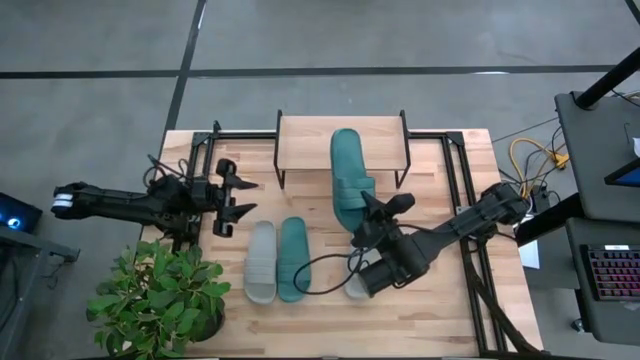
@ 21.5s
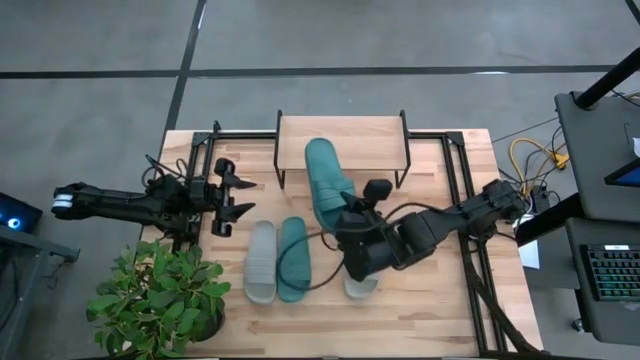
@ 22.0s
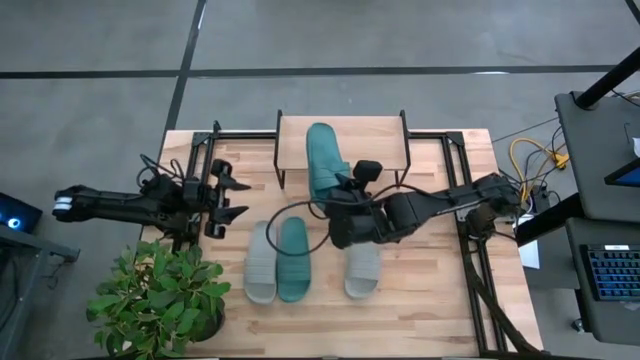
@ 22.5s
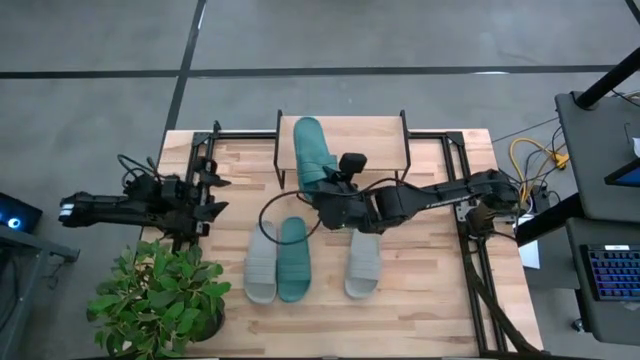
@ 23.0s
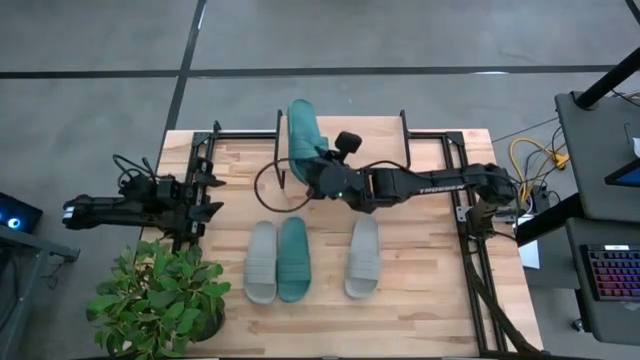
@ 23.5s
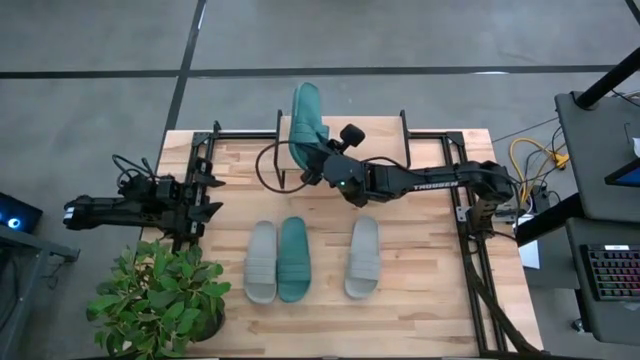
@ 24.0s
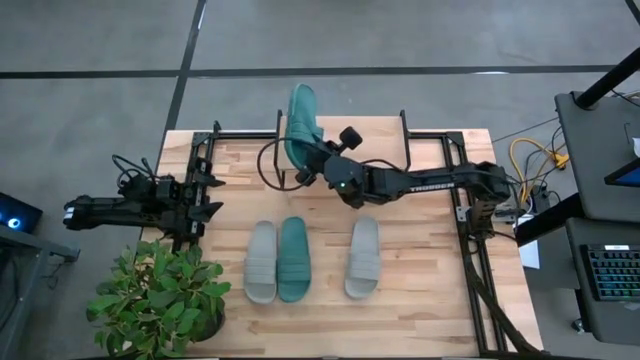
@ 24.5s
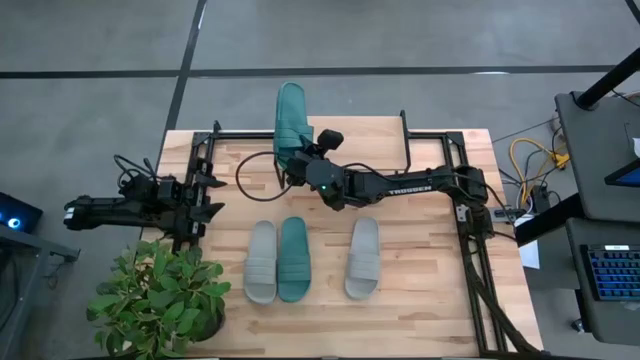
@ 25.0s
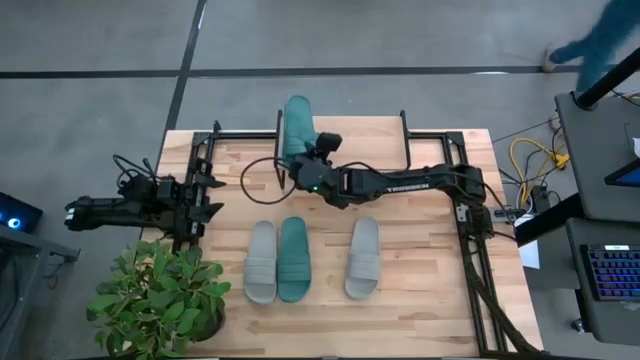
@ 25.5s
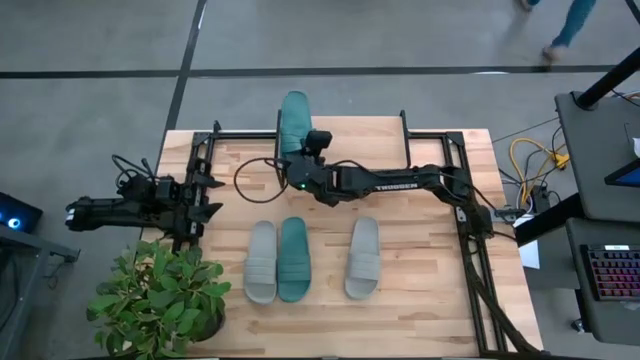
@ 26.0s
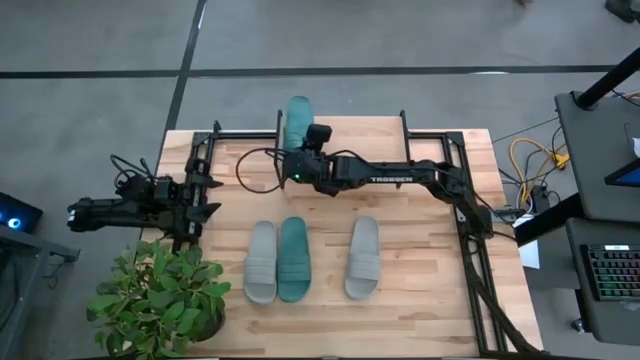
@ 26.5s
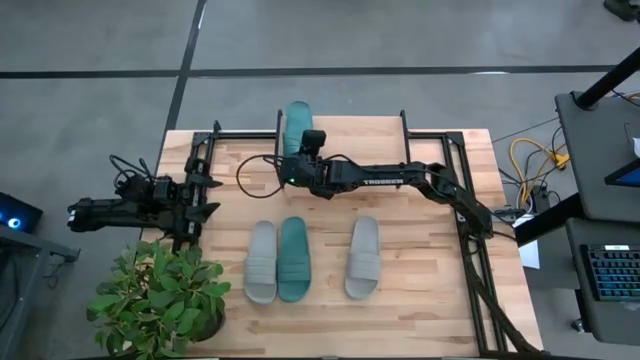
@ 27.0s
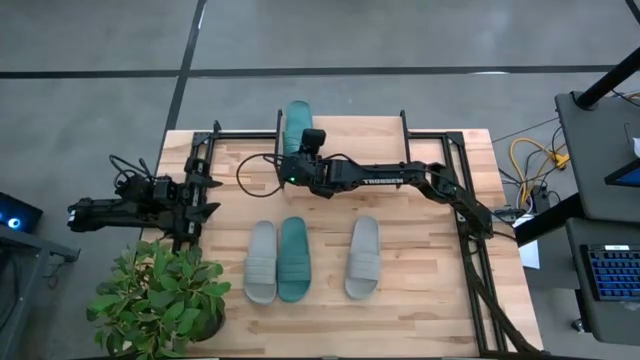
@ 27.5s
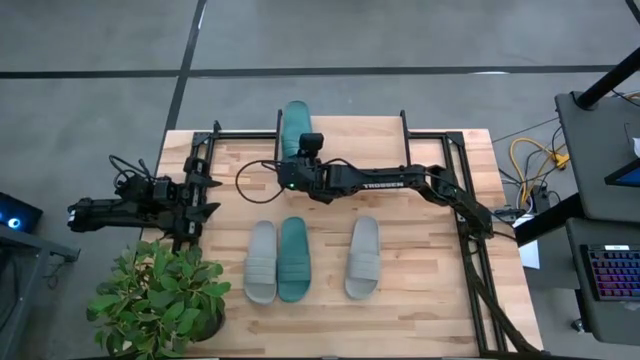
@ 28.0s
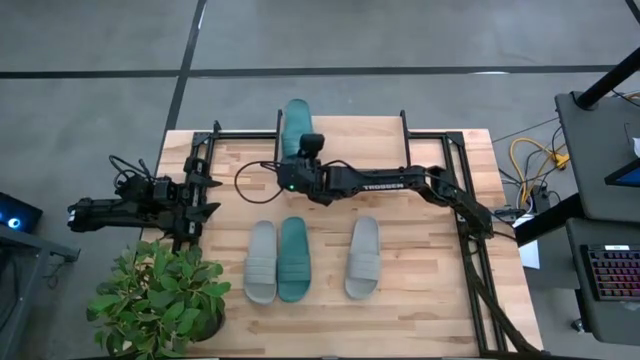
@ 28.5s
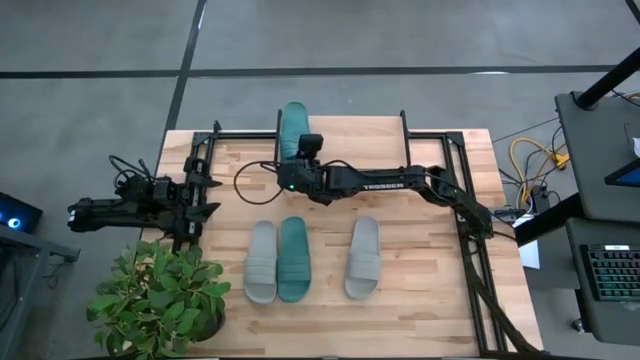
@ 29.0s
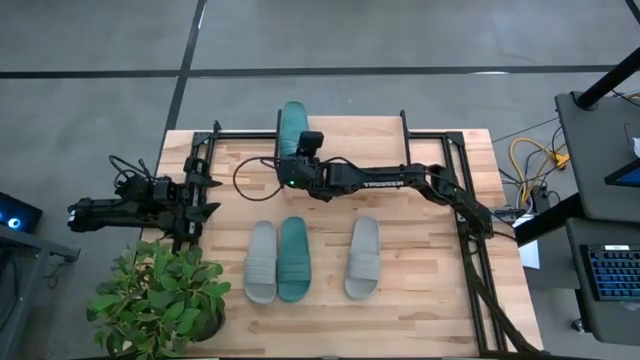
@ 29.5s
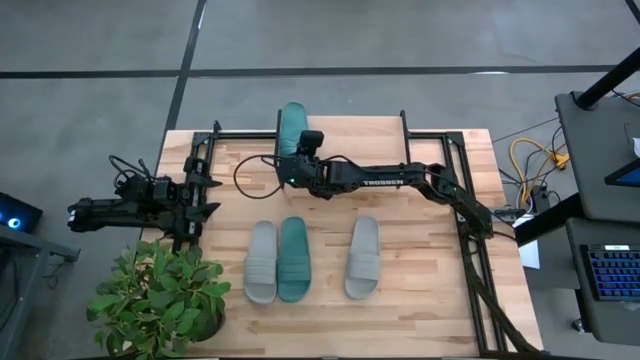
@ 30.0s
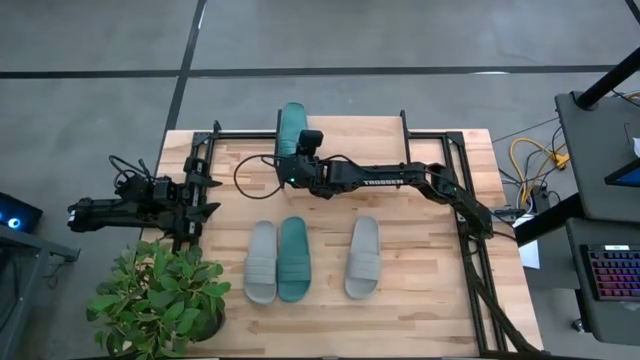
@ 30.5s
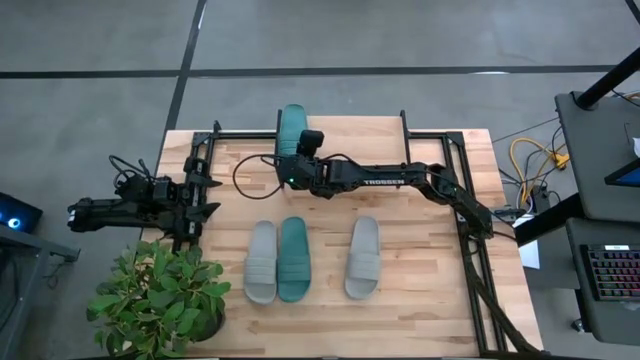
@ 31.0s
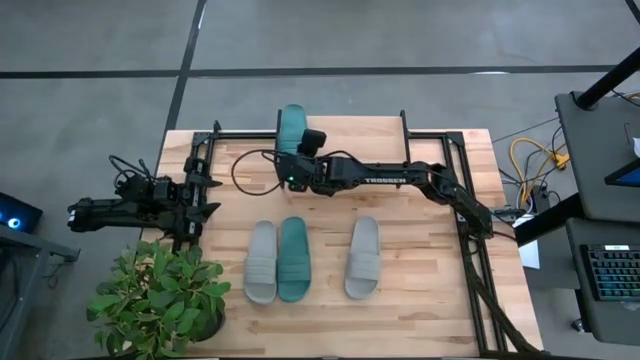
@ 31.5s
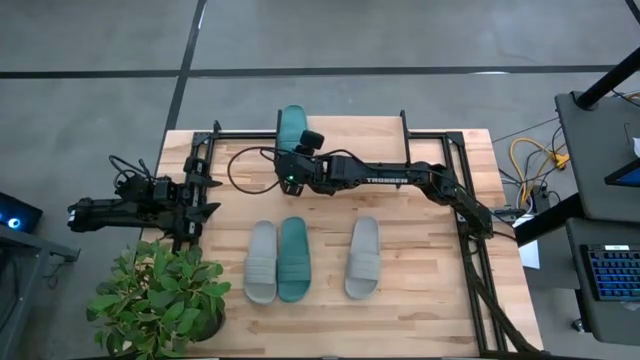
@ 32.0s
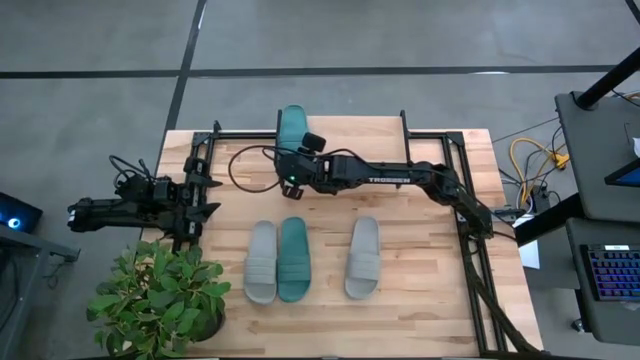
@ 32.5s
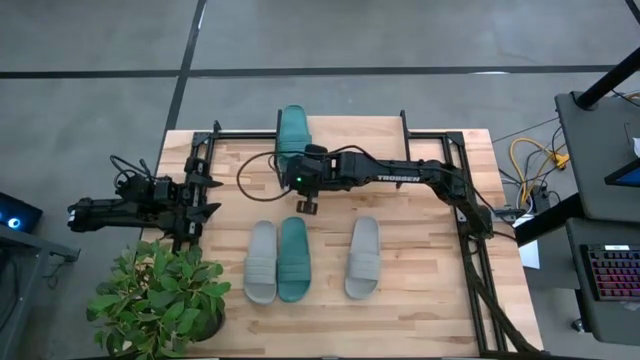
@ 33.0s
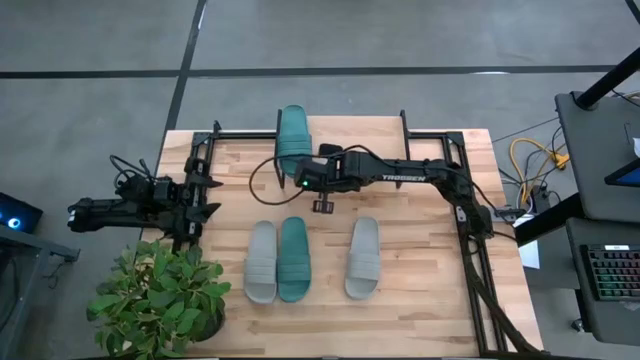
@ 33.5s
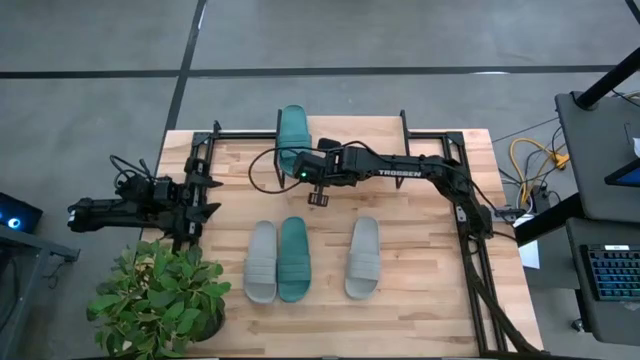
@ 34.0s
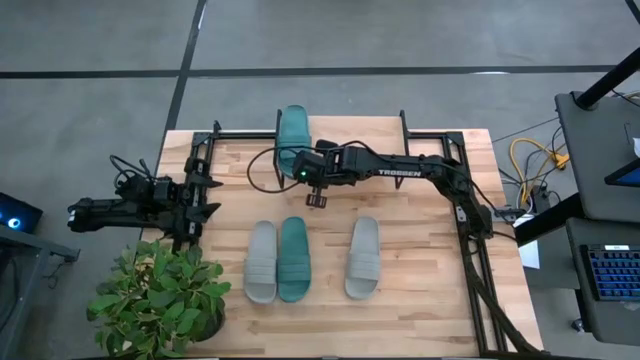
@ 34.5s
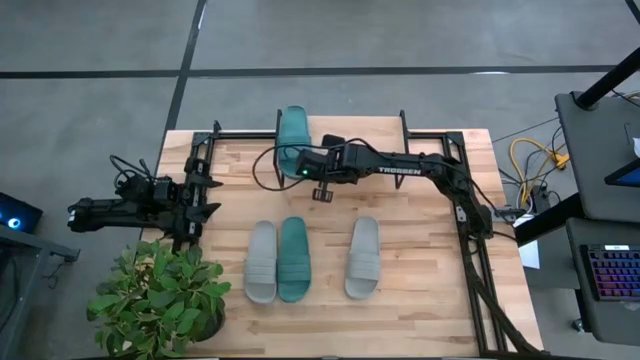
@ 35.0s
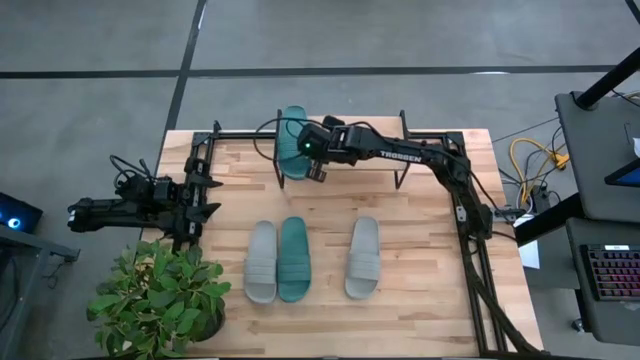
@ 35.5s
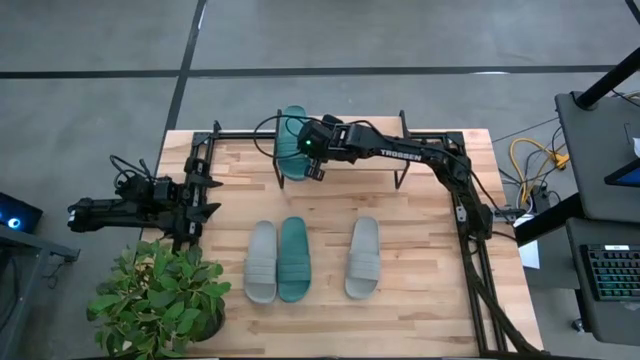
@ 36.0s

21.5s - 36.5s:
Task: Pick and place slides into the shelf
Put the right green slide on the shelf

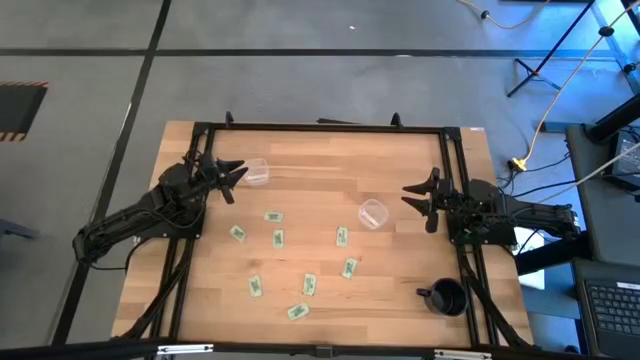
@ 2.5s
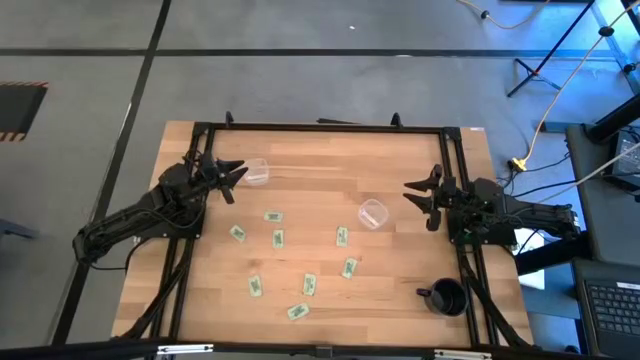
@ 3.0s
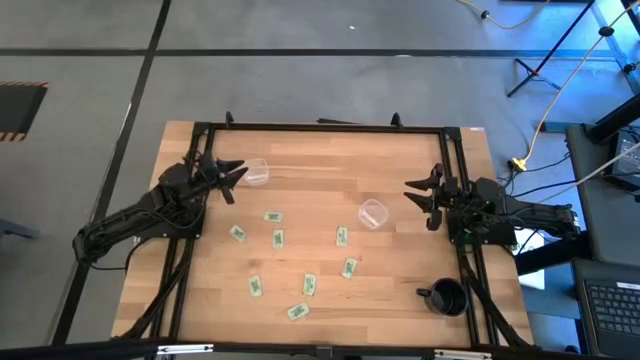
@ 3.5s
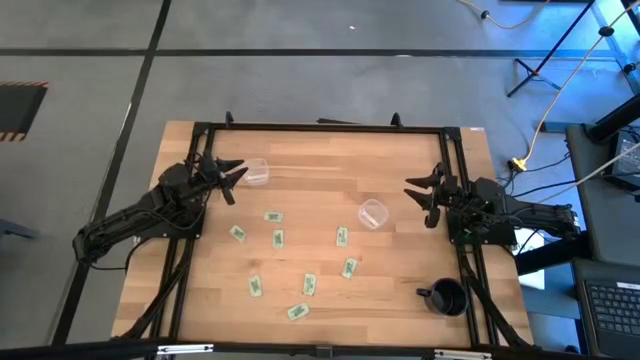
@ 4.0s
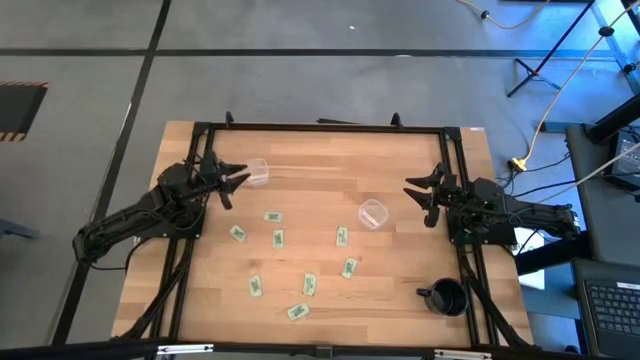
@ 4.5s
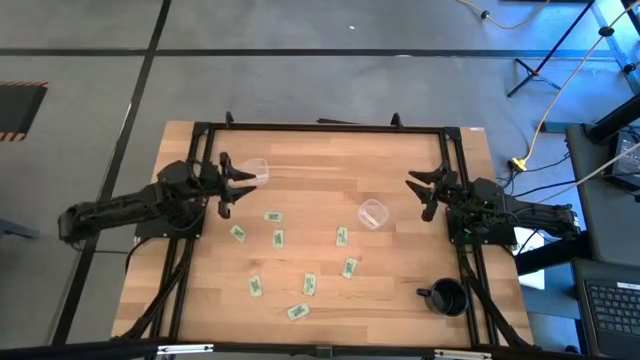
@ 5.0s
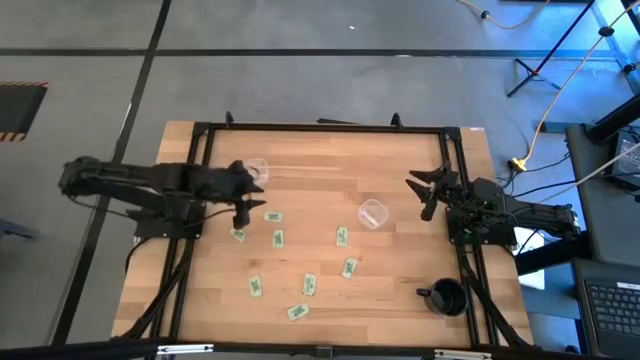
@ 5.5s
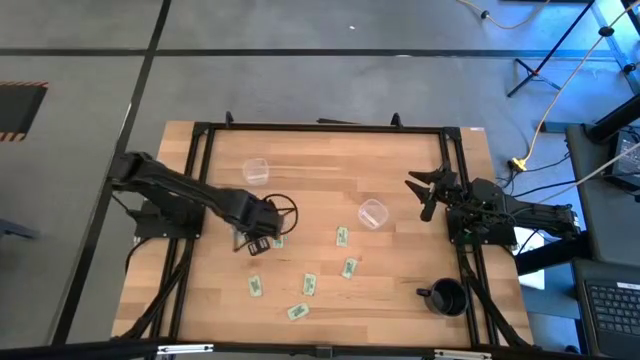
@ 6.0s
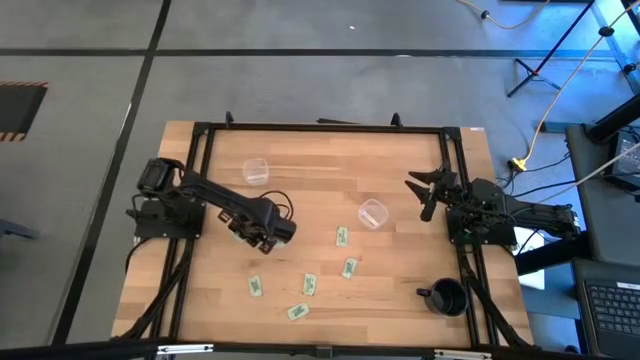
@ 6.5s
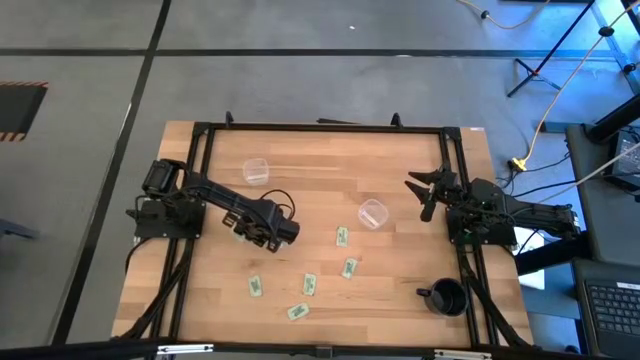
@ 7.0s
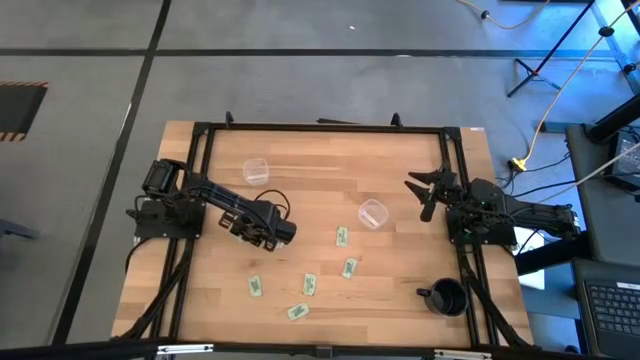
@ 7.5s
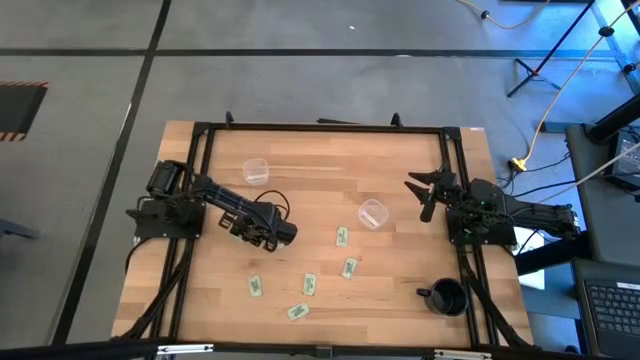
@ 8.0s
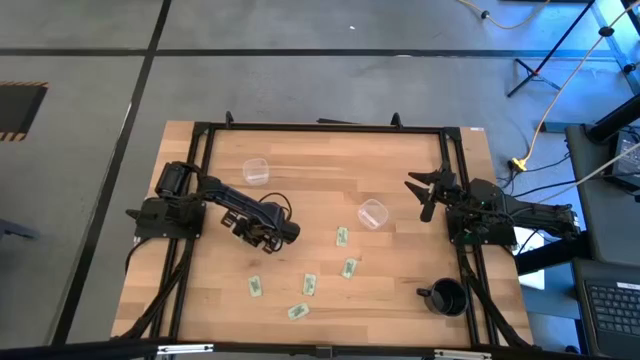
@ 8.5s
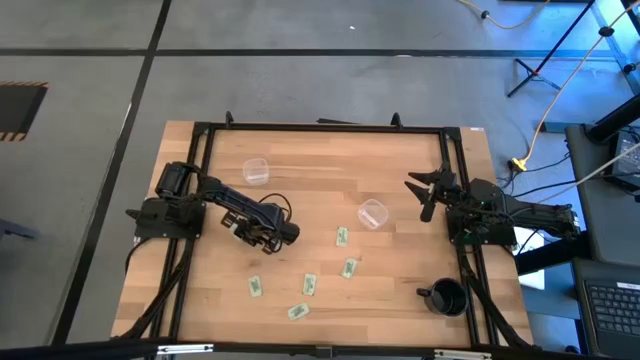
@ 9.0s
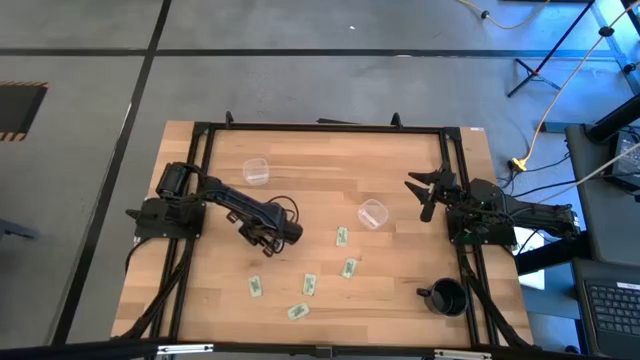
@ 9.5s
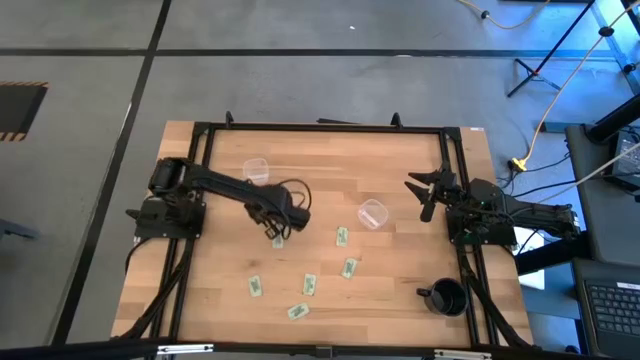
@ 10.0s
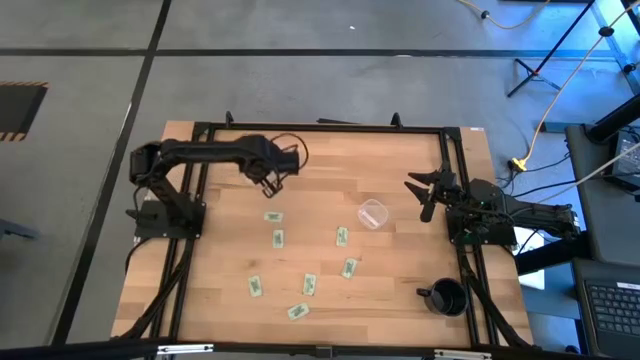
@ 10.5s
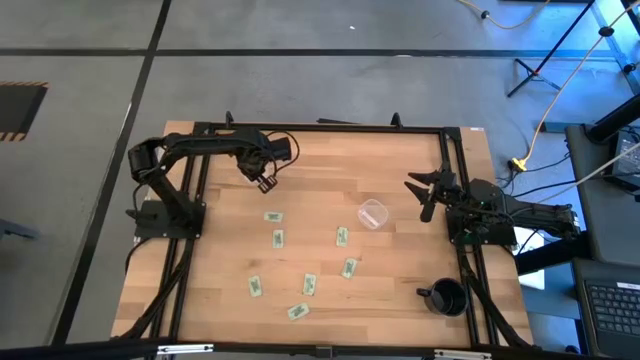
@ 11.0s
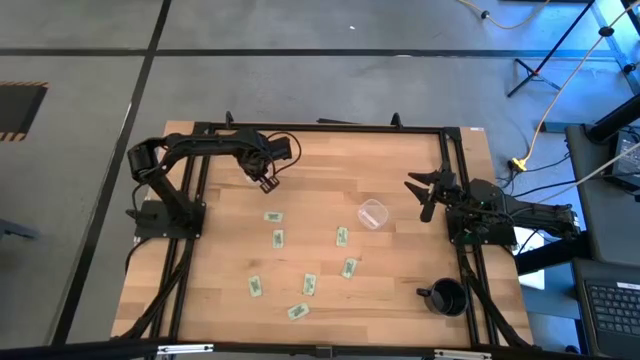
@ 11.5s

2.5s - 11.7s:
Task: Pick and place Stevia / Truvia into bins
Put the green stevia packet into the left white container
